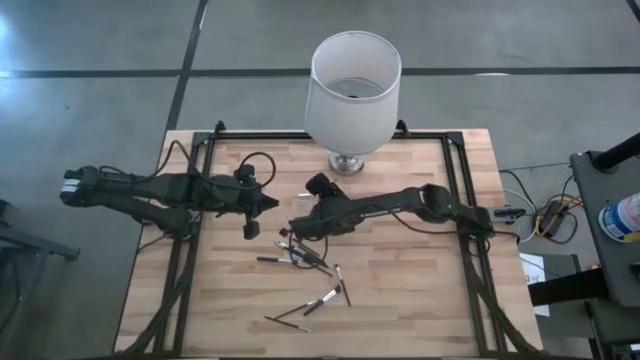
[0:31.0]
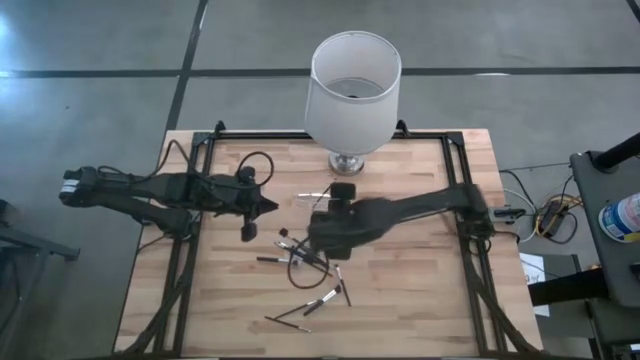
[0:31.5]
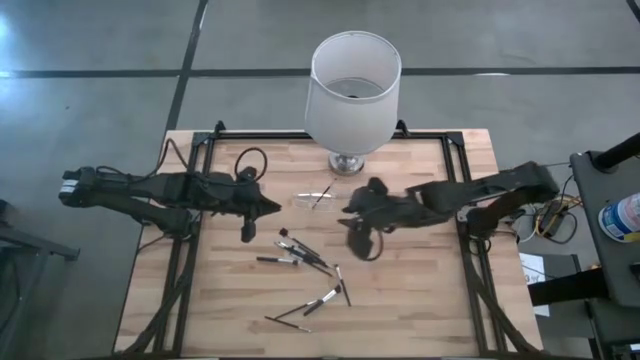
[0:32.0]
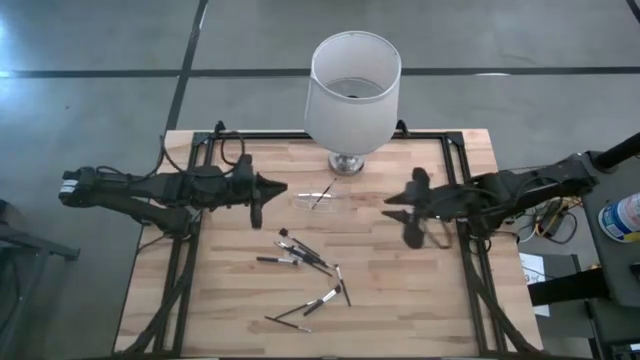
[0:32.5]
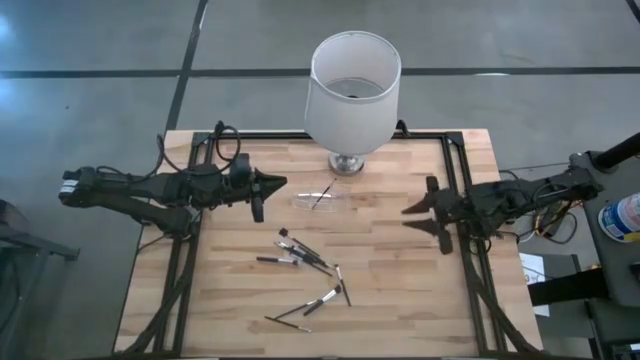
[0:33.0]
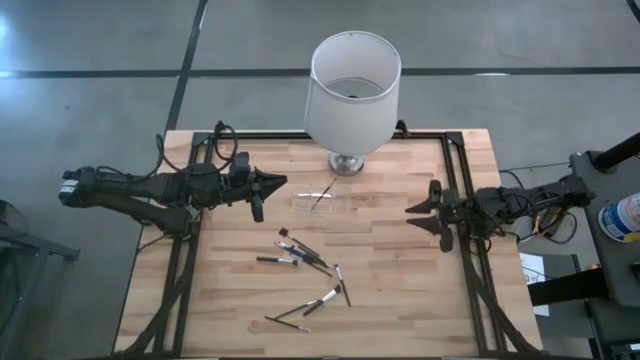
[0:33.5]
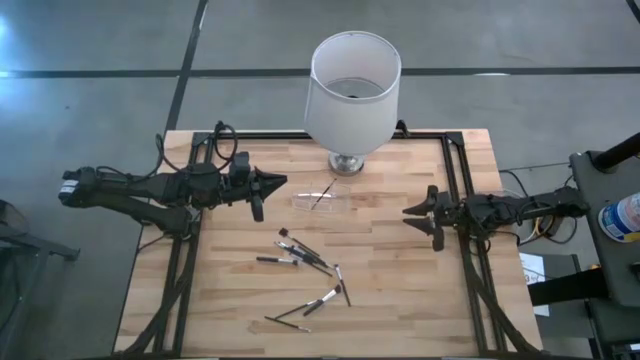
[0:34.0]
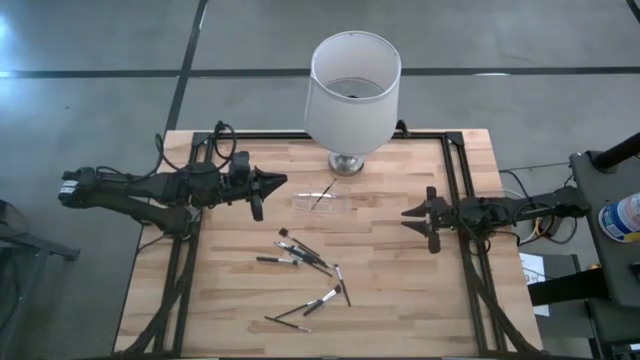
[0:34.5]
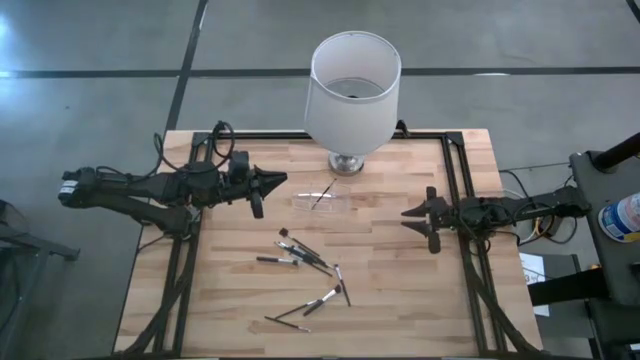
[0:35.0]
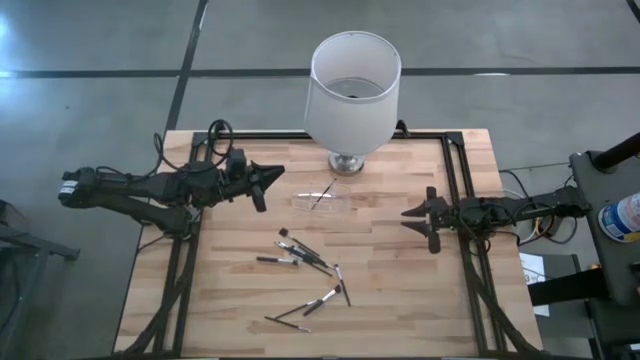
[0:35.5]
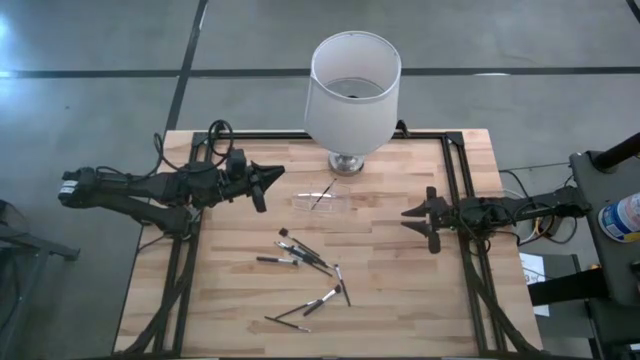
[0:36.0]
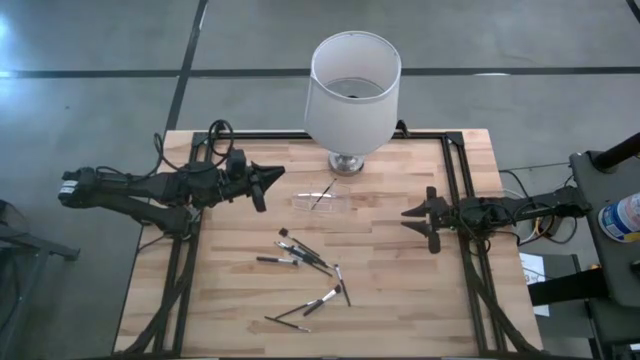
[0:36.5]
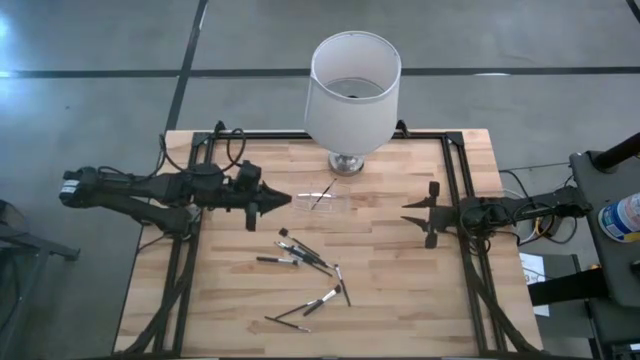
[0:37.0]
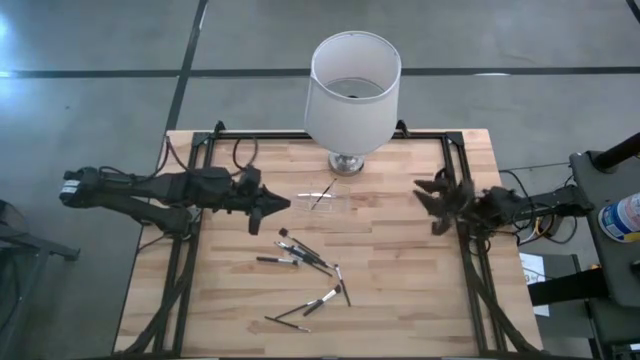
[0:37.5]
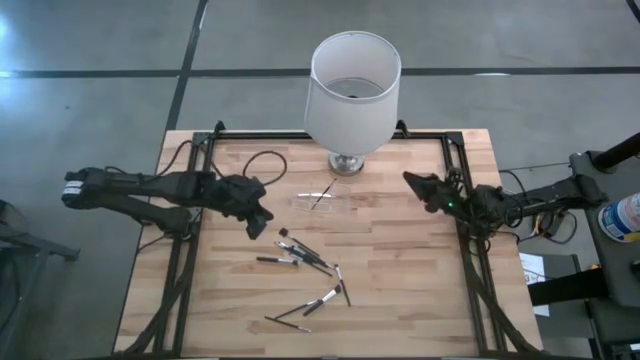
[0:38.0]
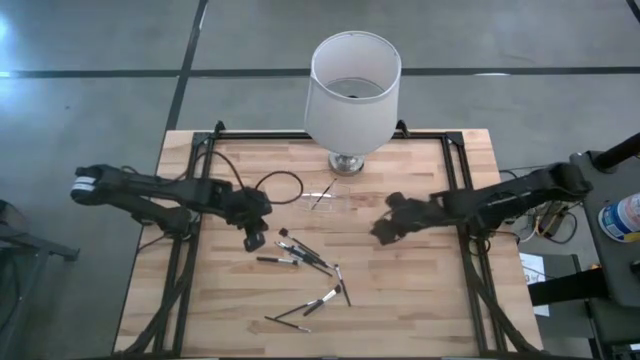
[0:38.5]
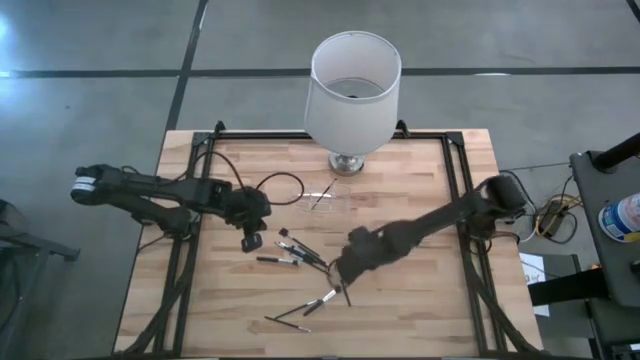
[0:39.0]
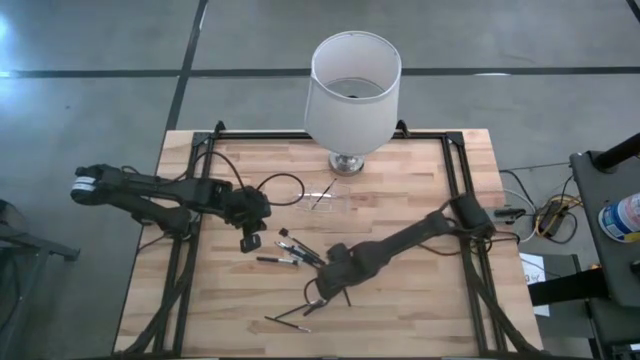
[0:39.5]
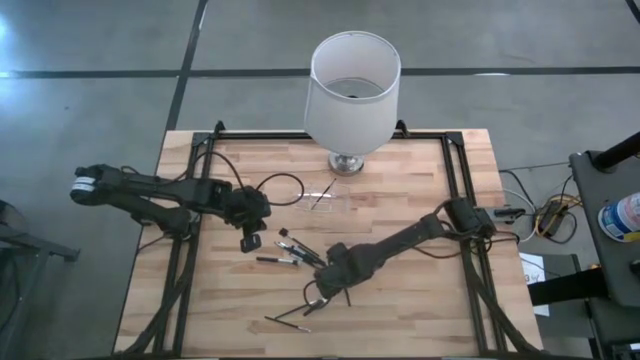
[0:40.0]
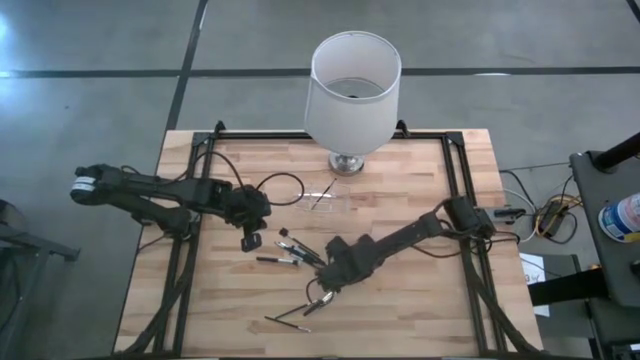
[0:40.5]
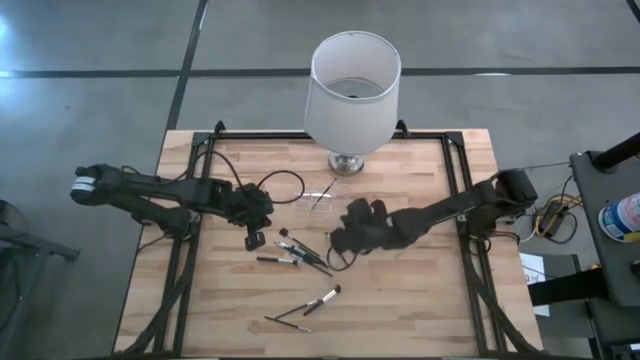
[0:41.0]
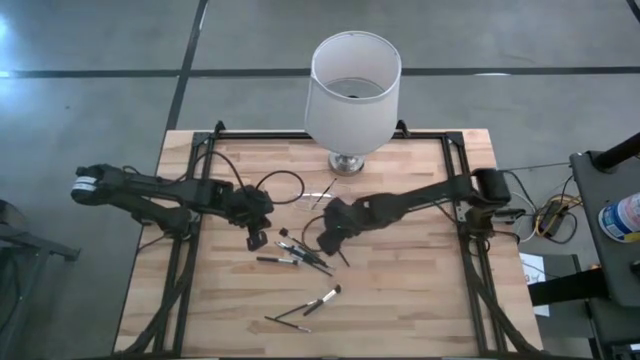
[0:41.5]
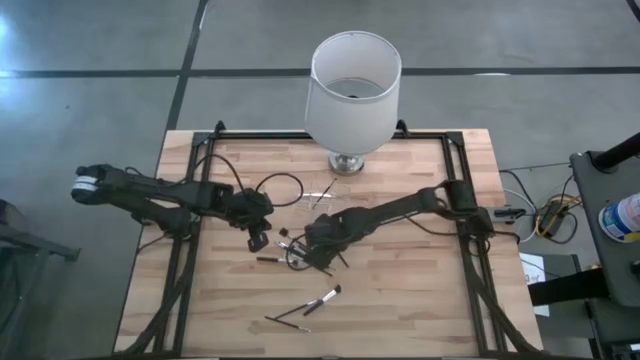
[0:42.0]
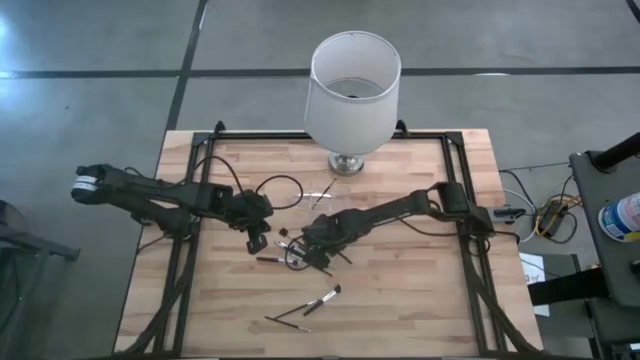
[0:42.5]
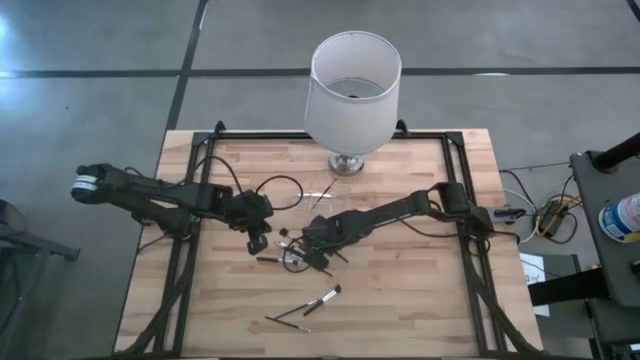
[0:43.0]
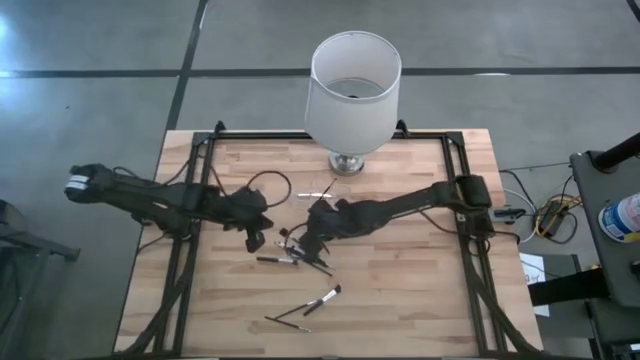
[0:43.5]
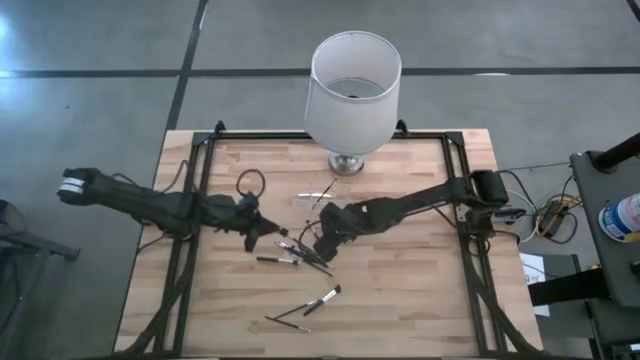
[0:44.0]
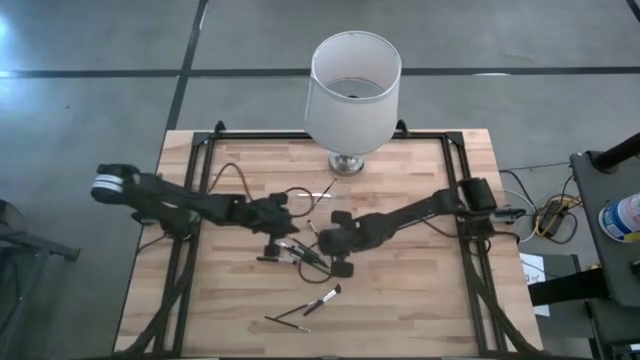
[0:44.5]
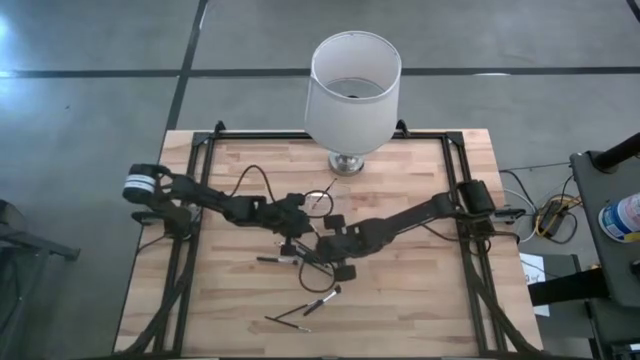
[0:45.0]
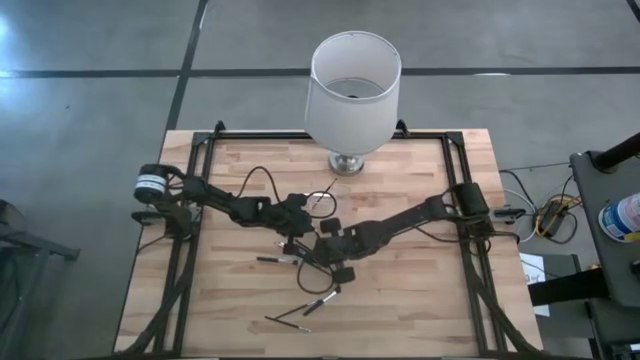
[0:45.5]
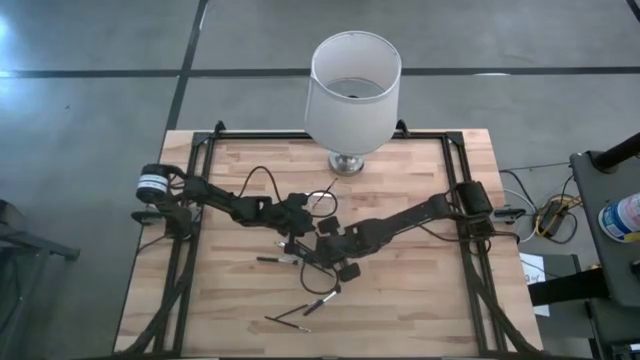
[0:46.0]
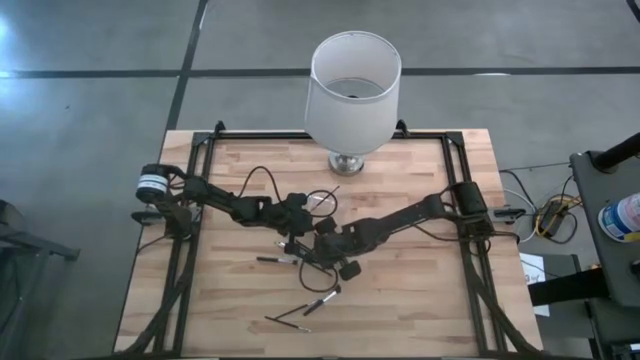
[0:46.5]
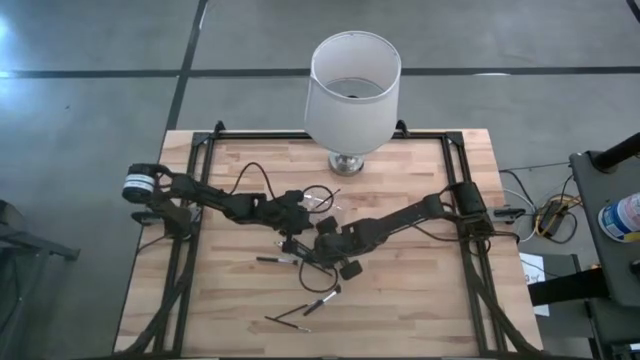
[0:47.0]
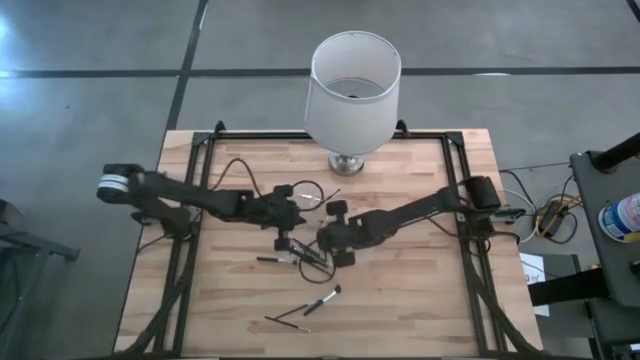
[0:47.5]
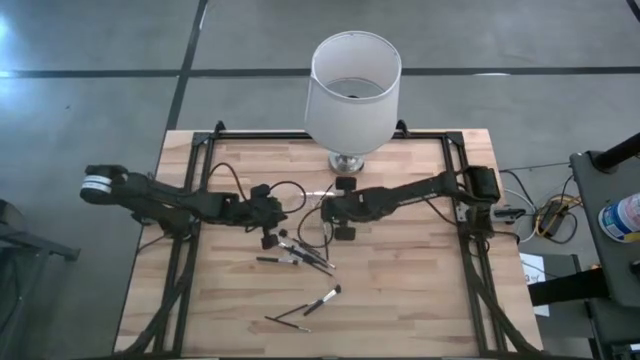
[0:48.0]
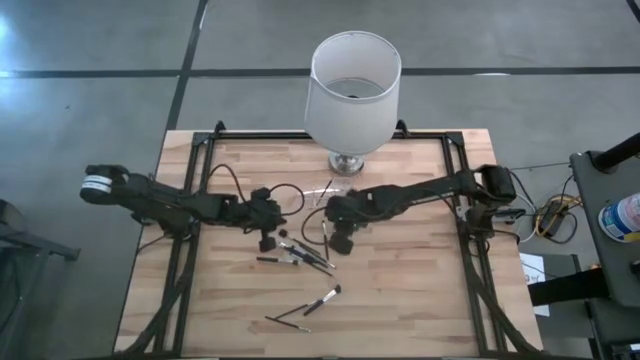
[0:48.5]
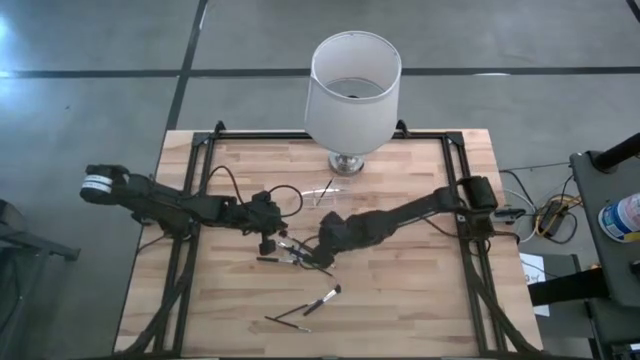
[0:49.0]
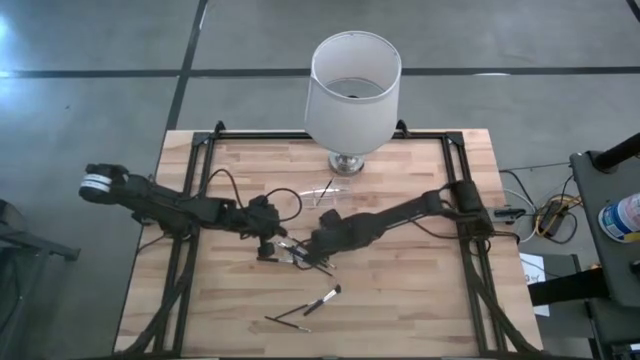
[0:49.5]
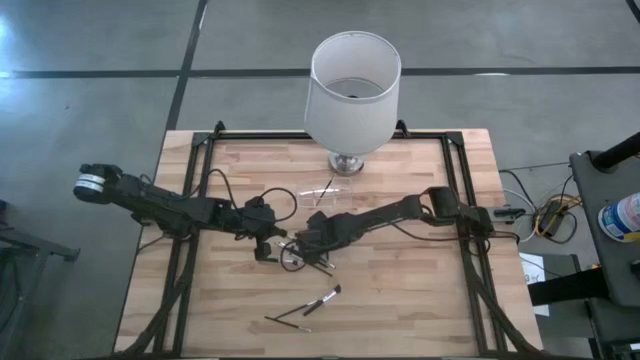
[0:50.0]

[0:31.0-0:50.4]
Task: Put items in baskets/containers
Put the eyeshadow brush into the transparent organizer
